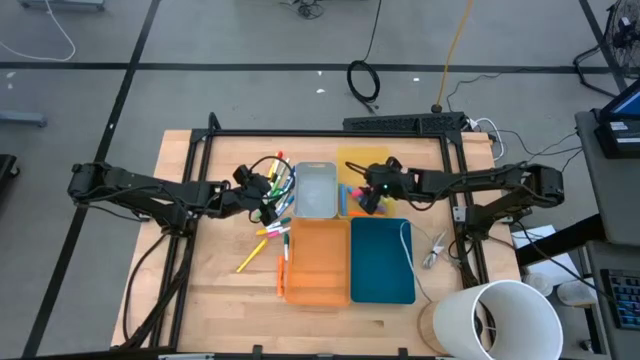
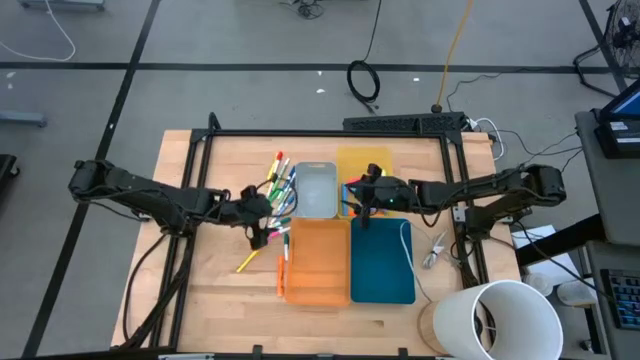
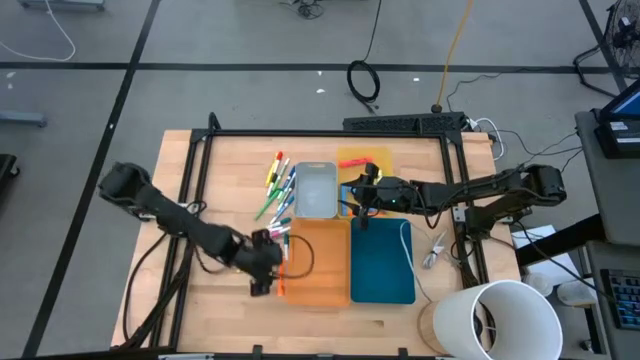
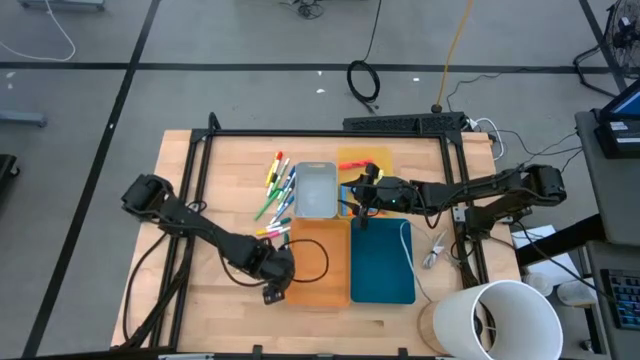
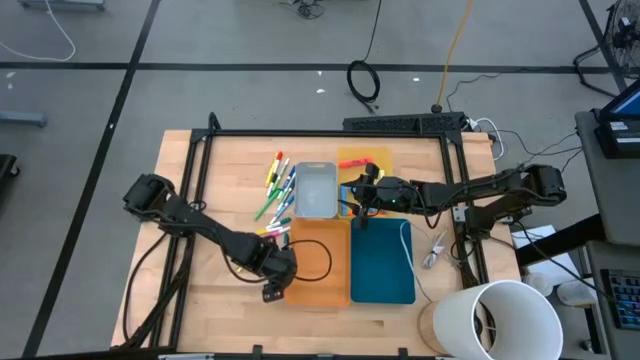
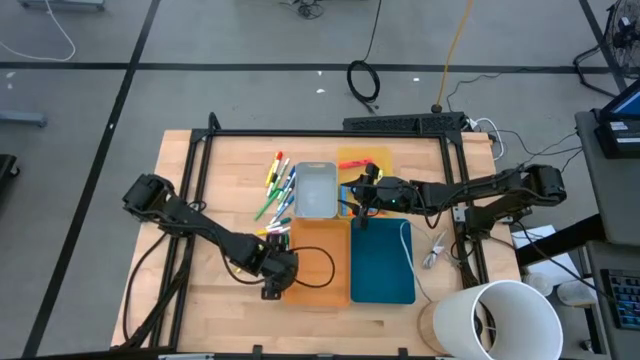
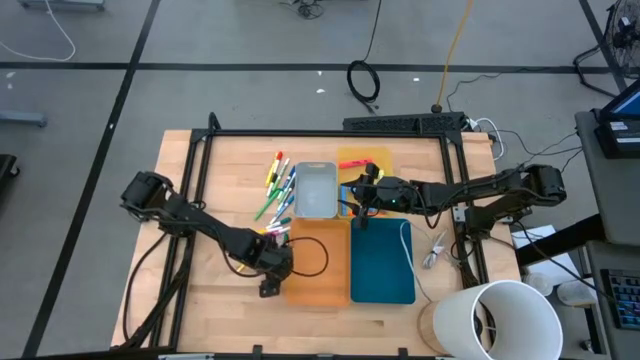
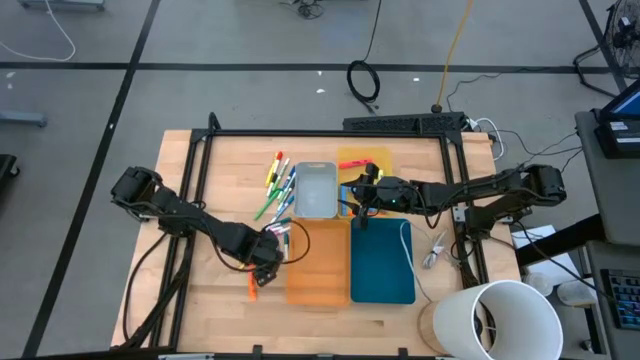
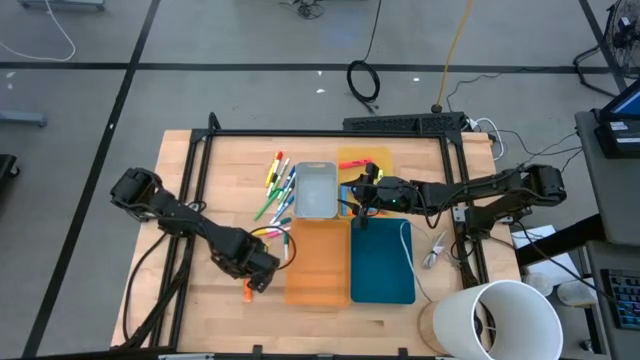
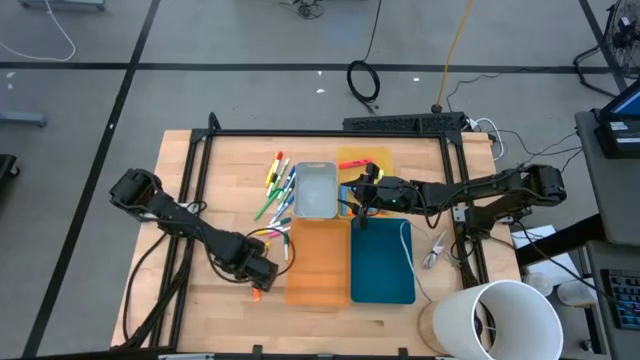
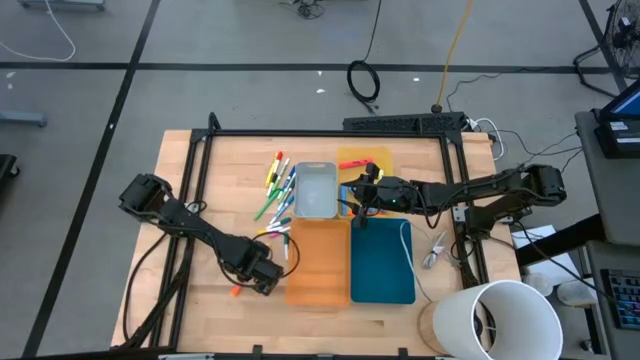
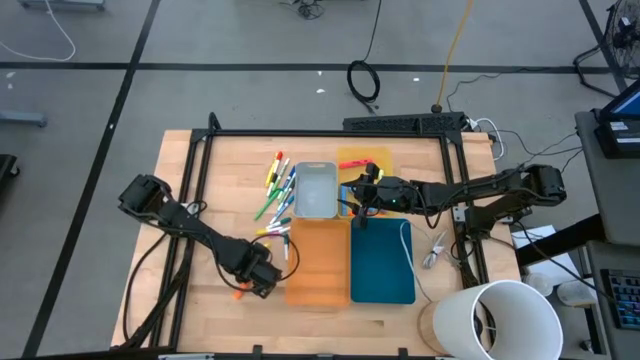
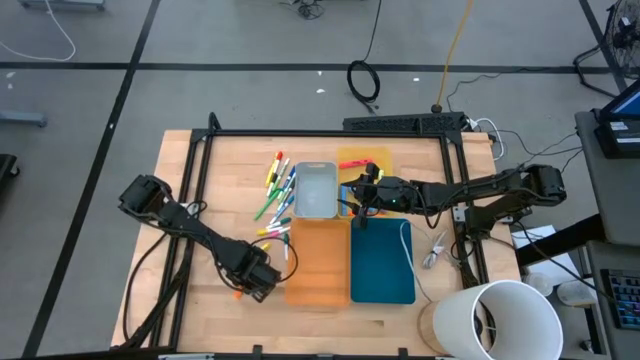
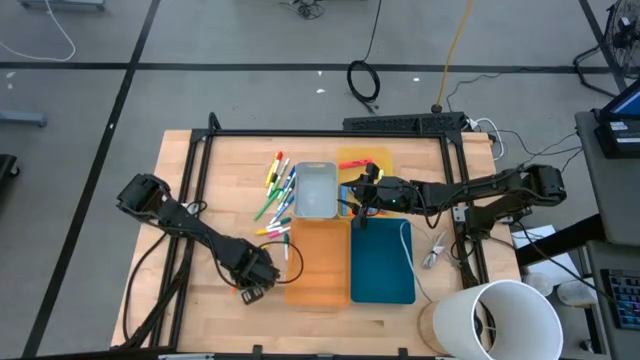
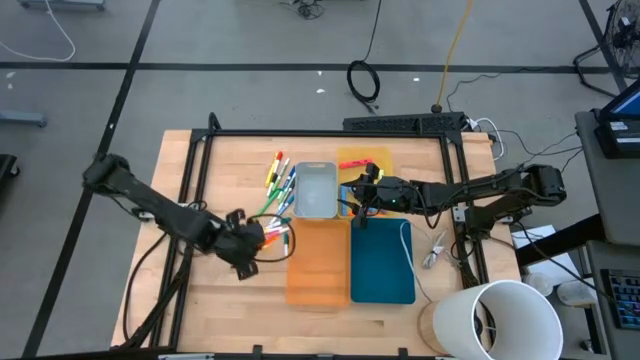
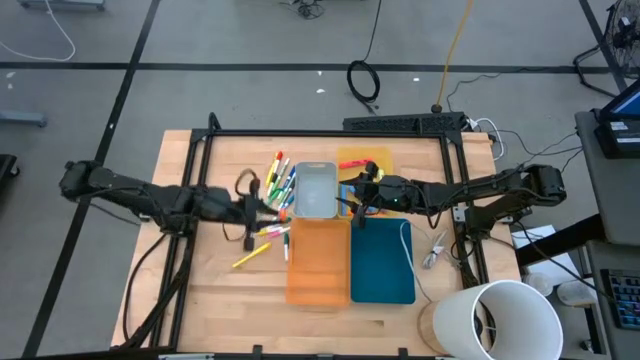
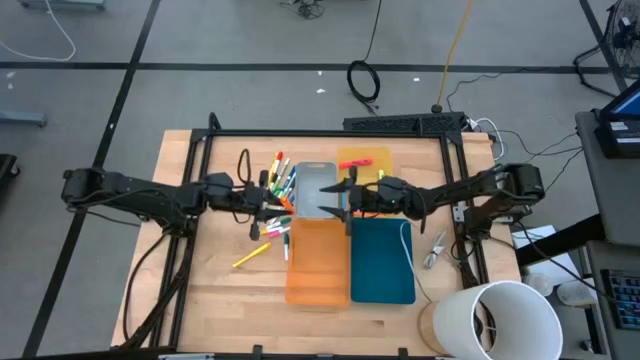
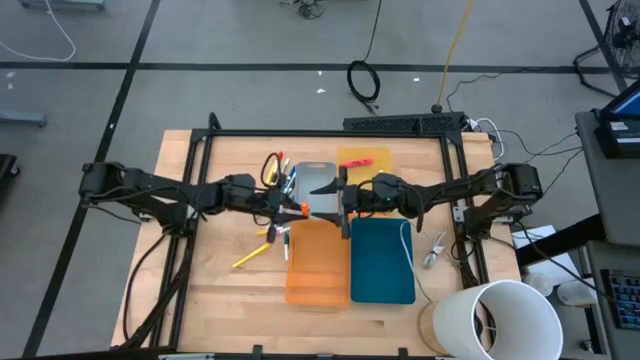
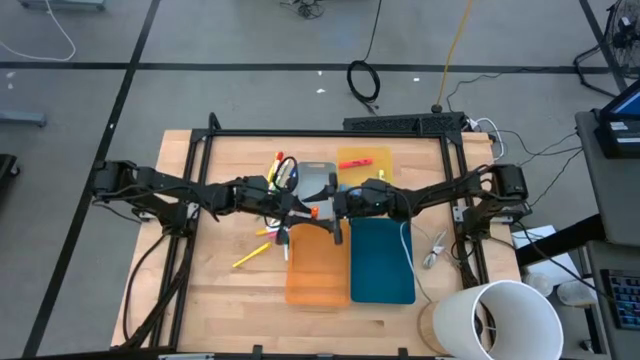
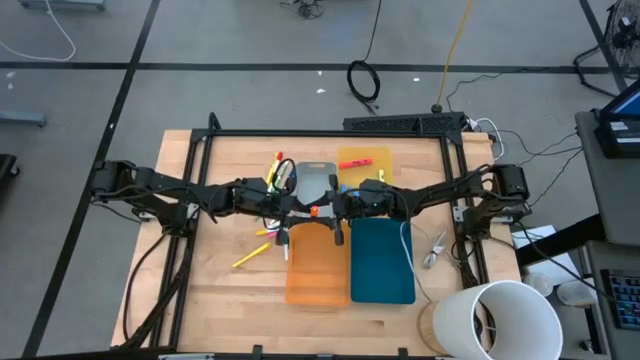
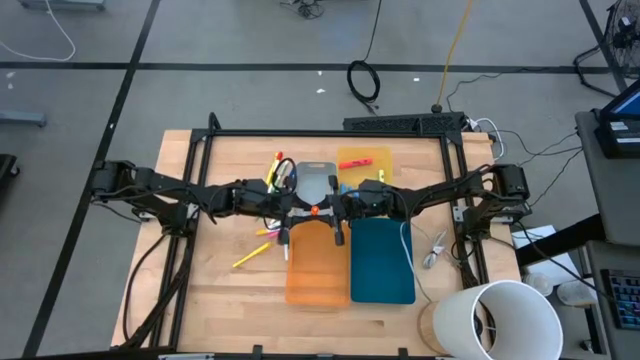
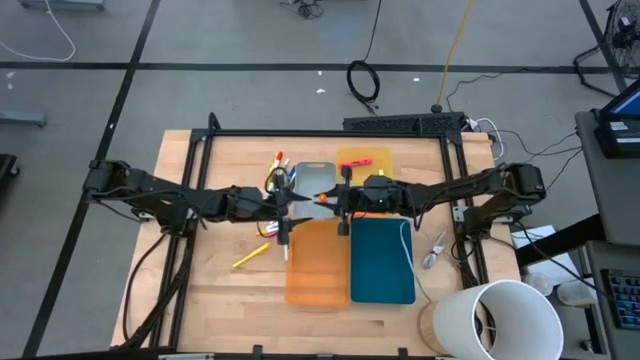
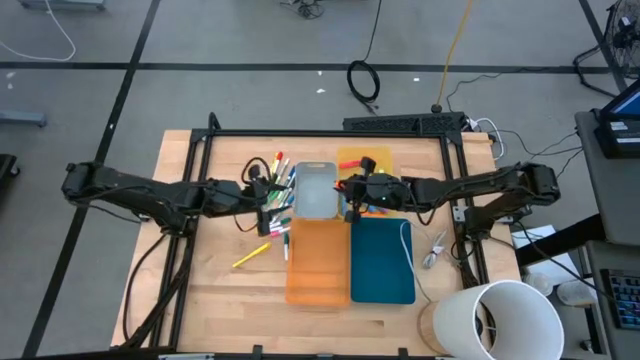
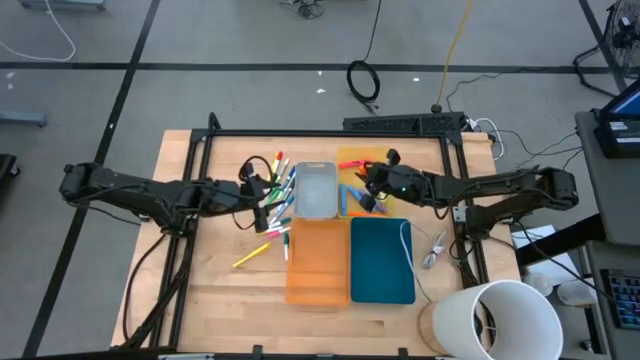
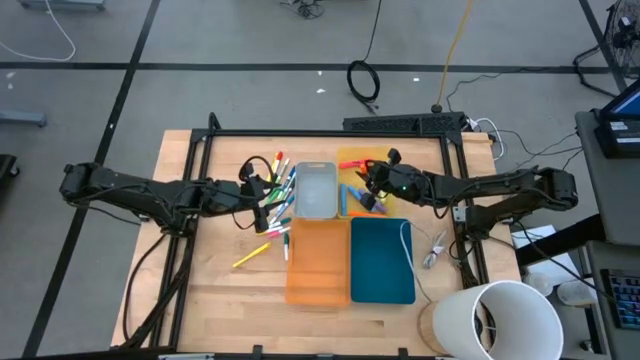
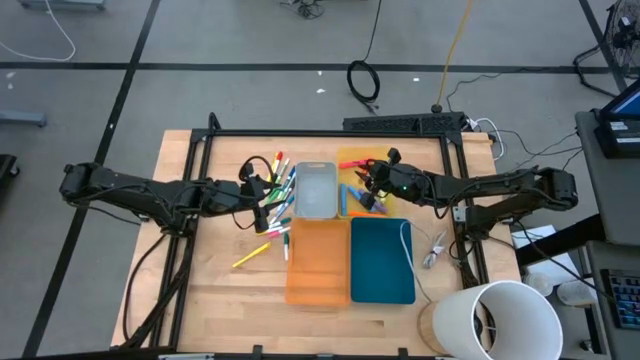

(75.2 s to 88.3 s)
Task: Pick & Place Markers
Put the orange highlighter pen into the yellow bin

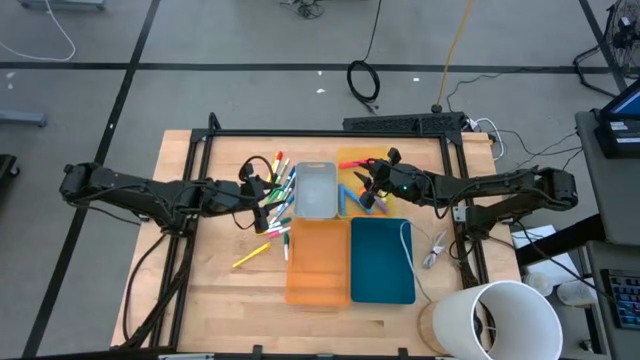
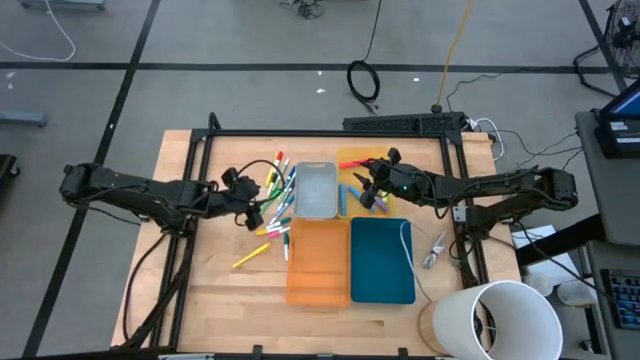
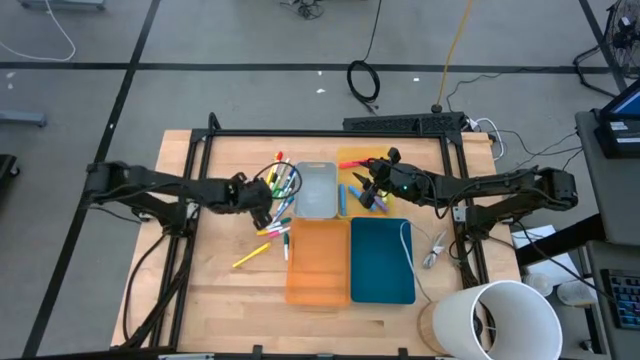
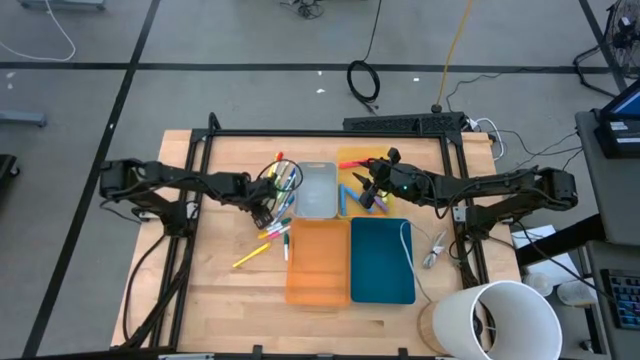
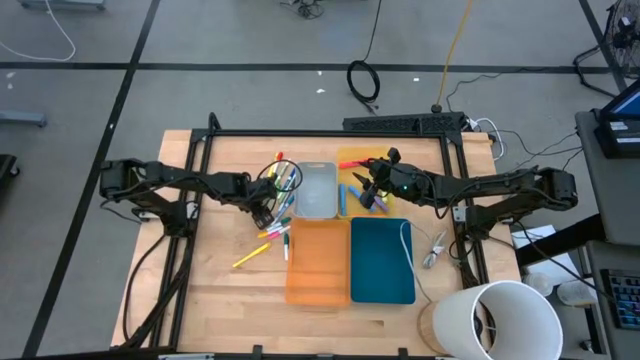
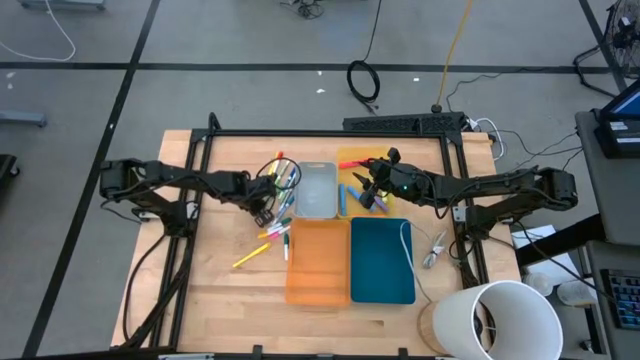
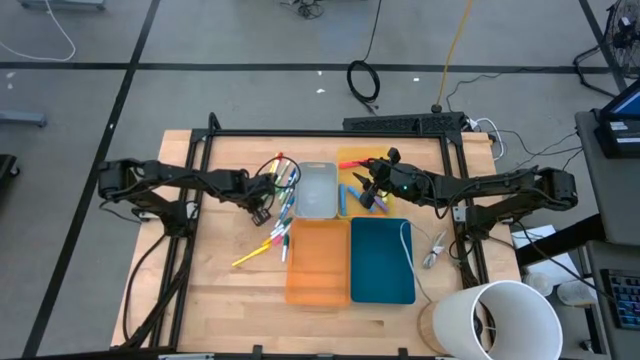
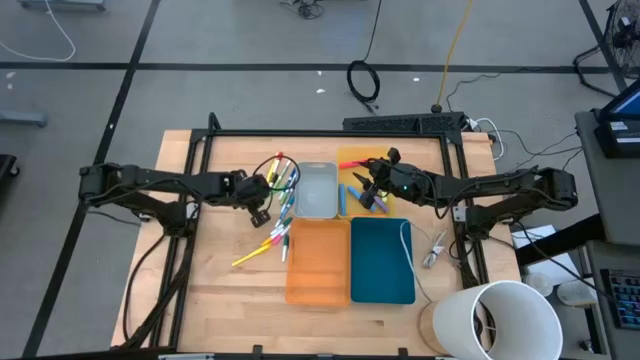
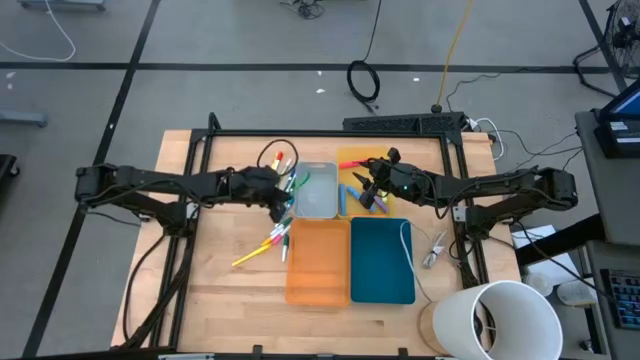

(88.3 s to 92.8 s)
Put the green pen into the gray bin

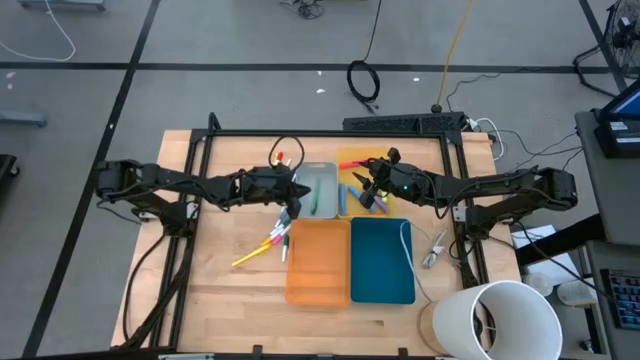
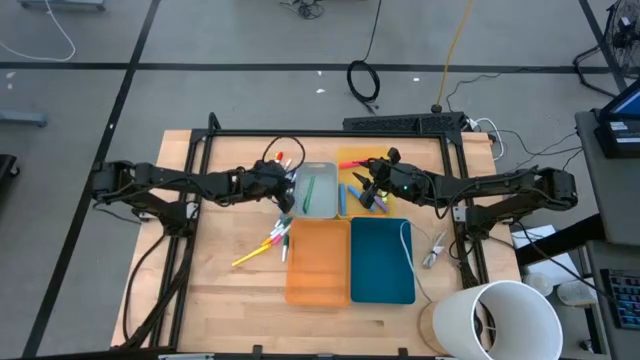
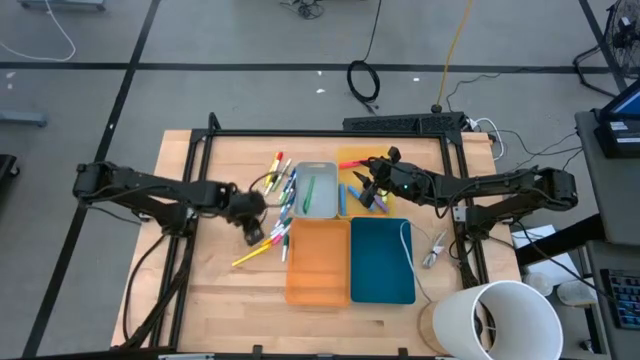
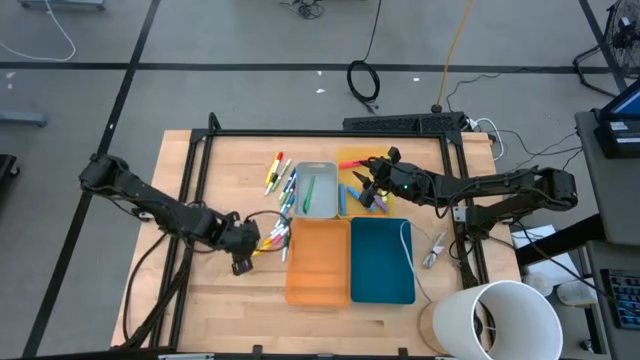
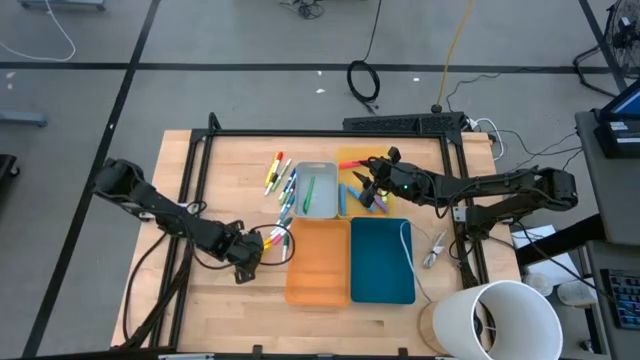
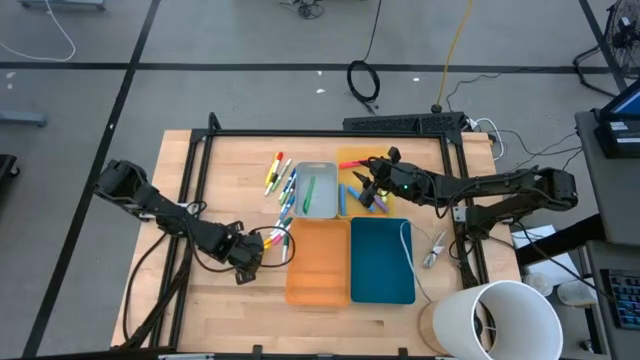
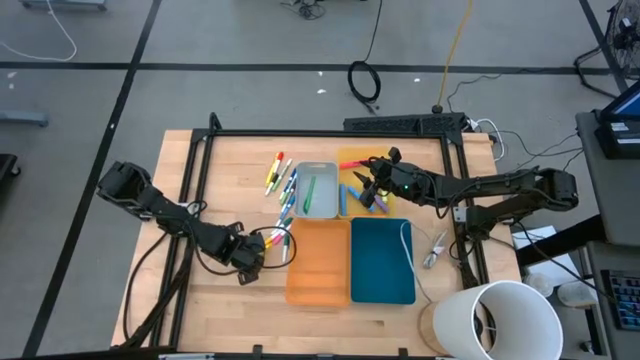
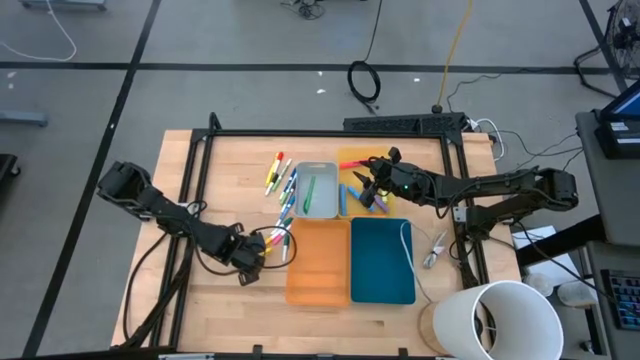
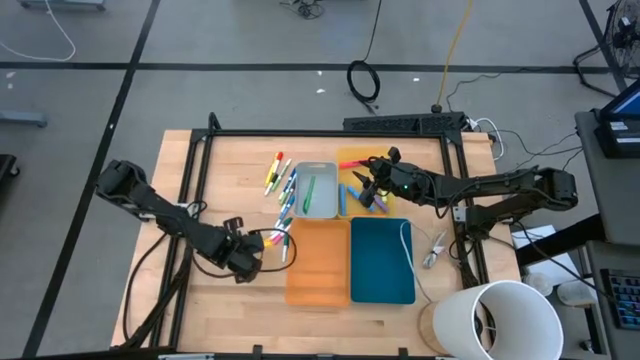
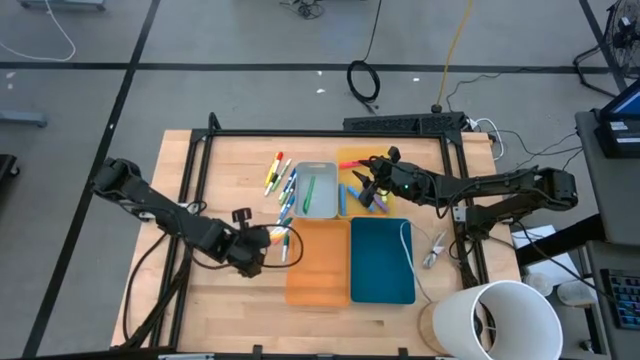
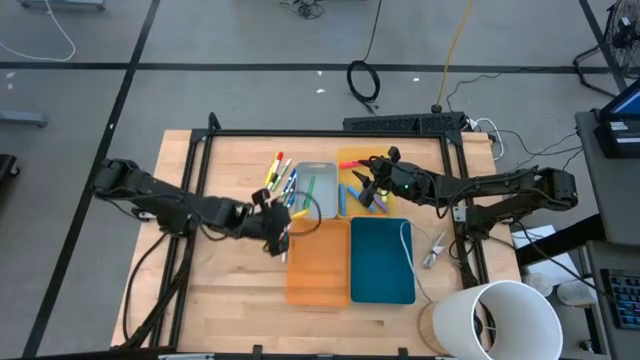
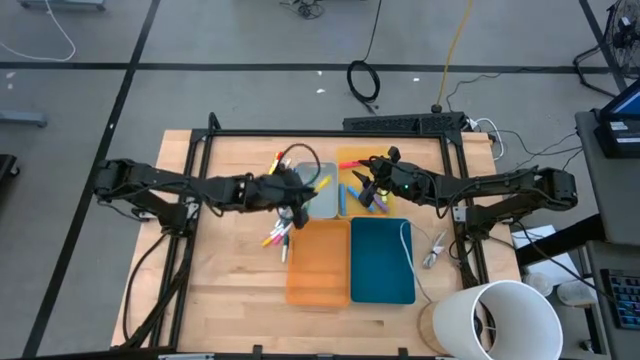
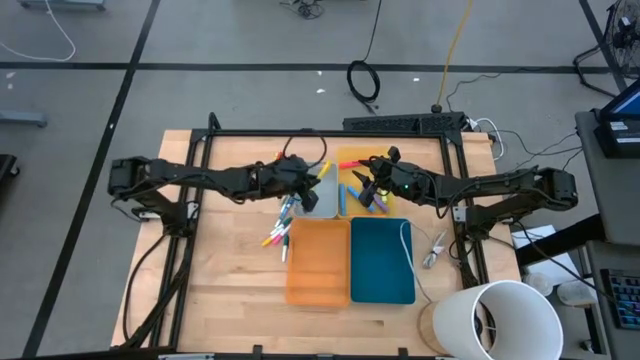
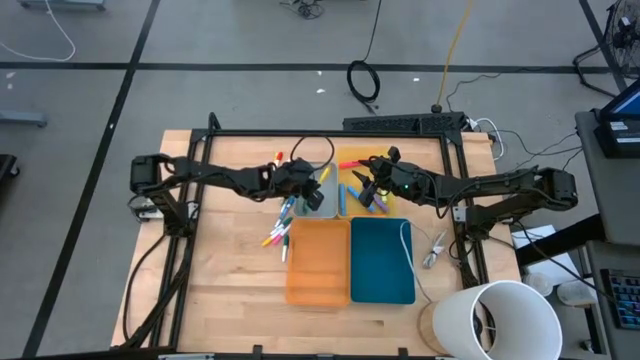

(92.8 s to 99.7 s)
Put the yellow pen into the gray bin
